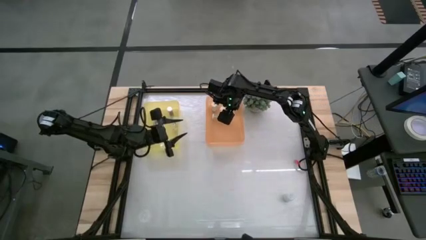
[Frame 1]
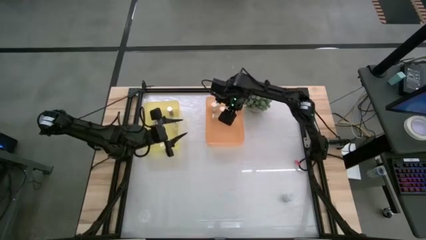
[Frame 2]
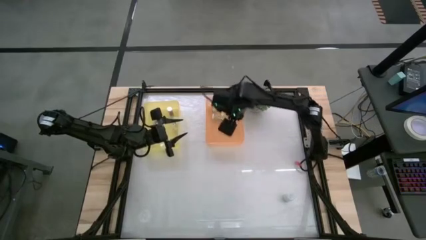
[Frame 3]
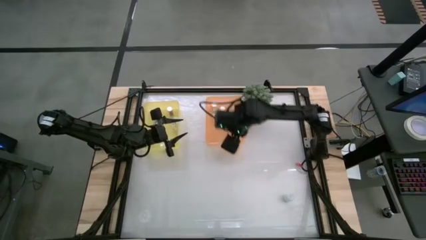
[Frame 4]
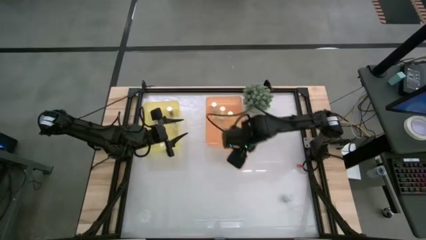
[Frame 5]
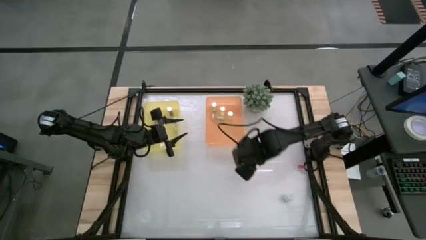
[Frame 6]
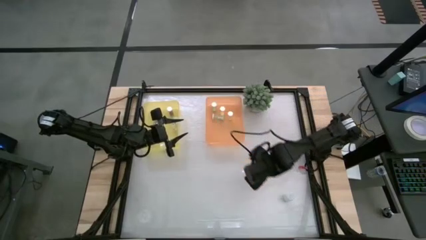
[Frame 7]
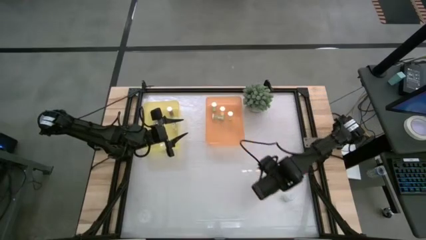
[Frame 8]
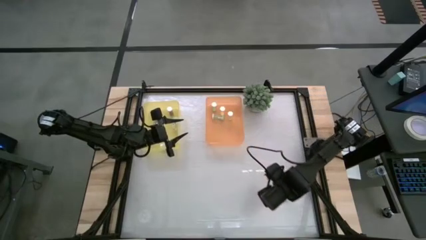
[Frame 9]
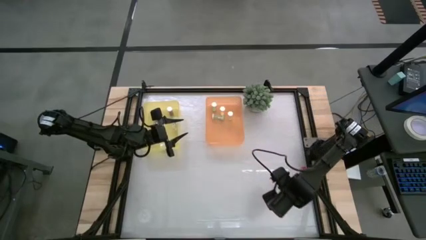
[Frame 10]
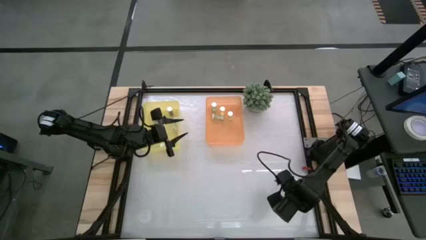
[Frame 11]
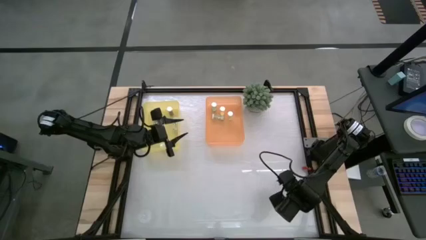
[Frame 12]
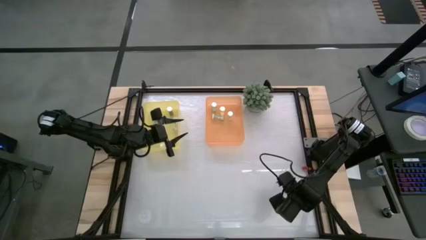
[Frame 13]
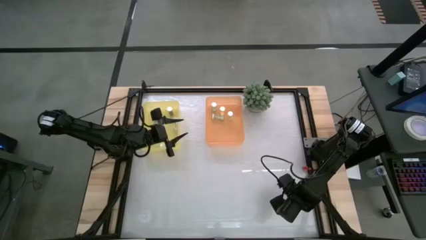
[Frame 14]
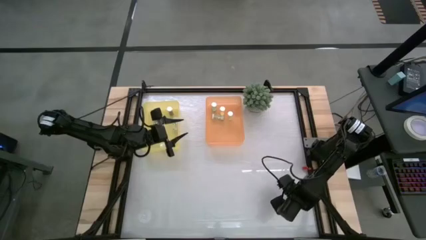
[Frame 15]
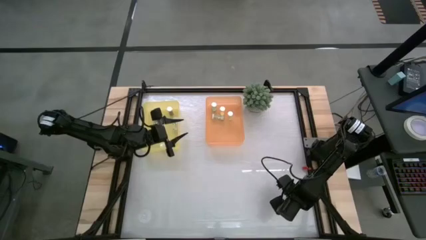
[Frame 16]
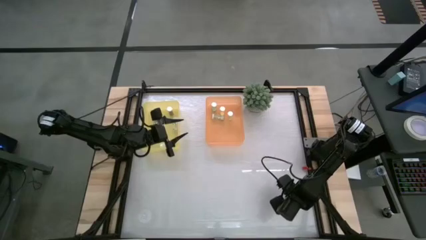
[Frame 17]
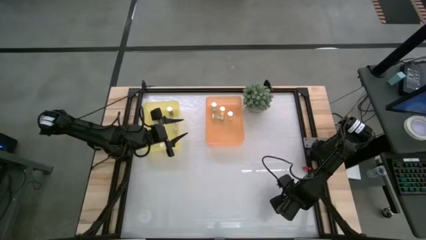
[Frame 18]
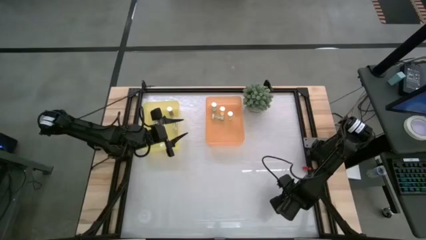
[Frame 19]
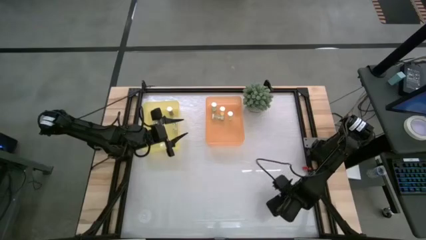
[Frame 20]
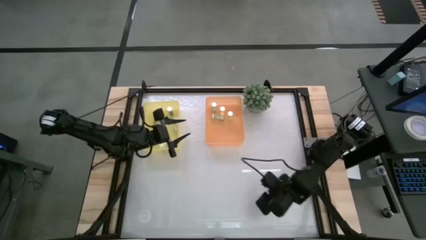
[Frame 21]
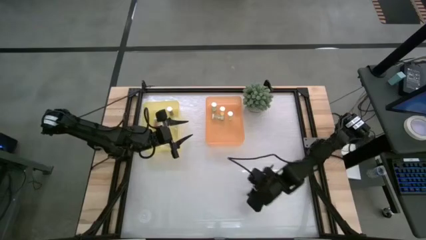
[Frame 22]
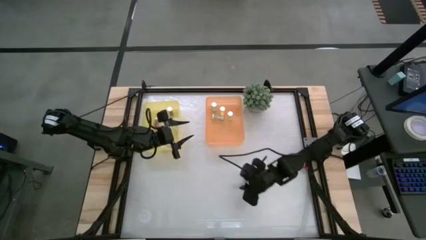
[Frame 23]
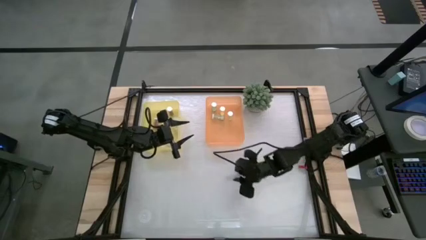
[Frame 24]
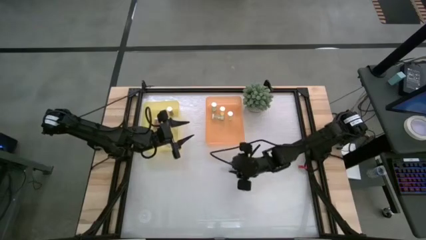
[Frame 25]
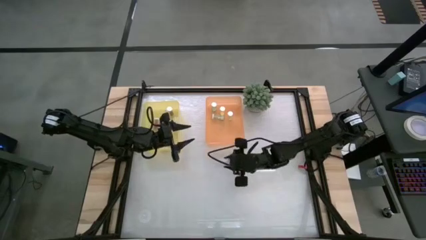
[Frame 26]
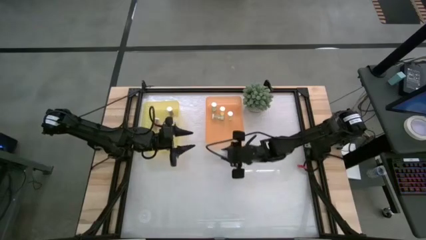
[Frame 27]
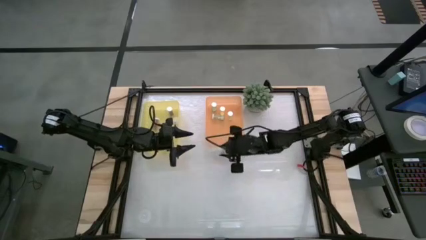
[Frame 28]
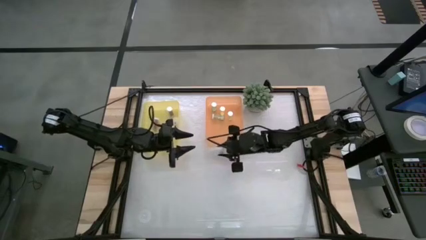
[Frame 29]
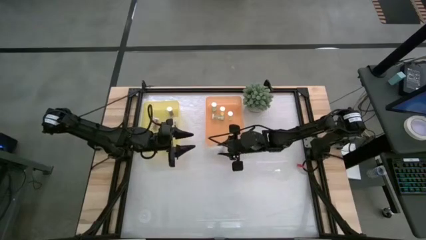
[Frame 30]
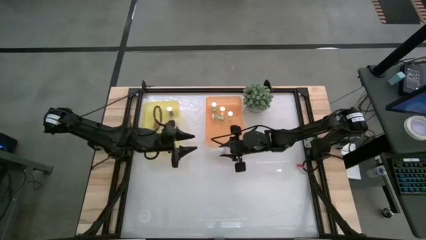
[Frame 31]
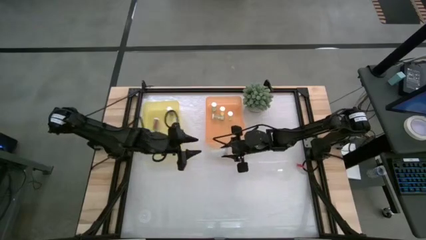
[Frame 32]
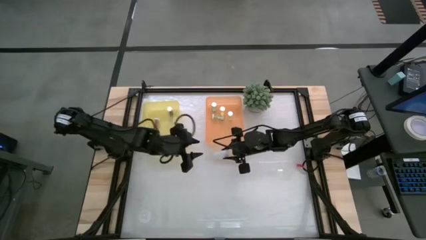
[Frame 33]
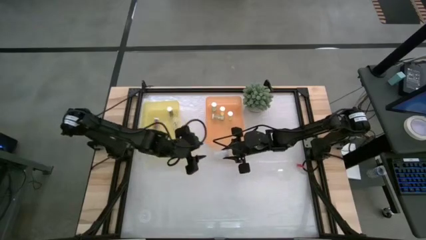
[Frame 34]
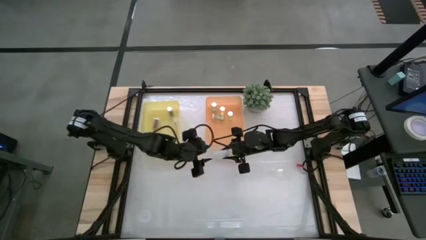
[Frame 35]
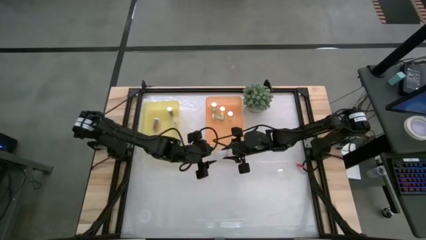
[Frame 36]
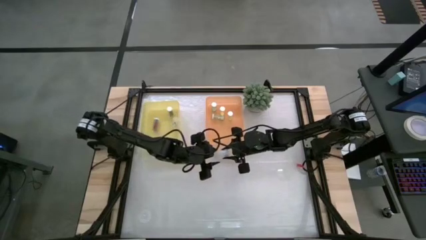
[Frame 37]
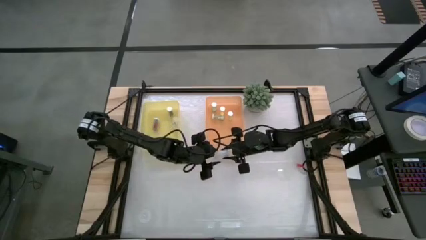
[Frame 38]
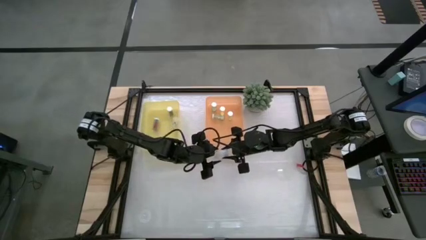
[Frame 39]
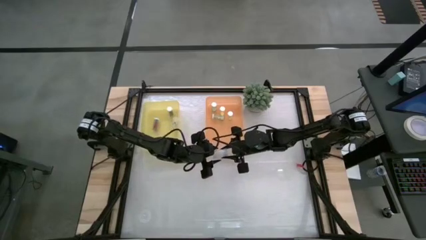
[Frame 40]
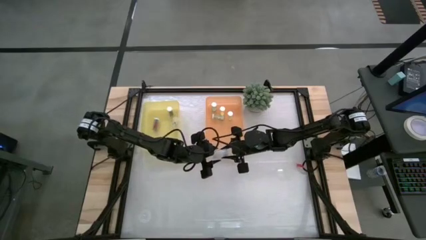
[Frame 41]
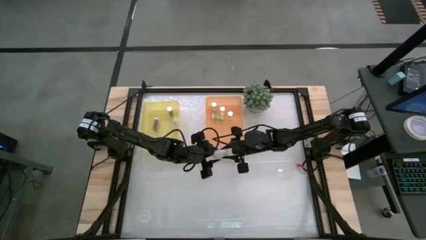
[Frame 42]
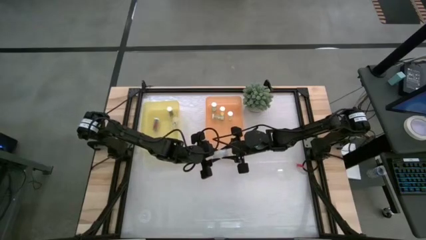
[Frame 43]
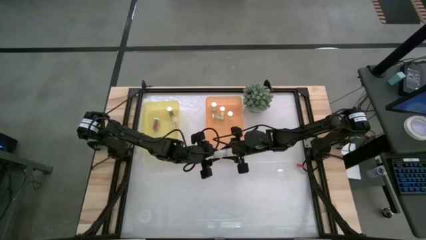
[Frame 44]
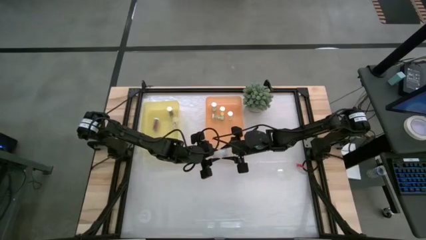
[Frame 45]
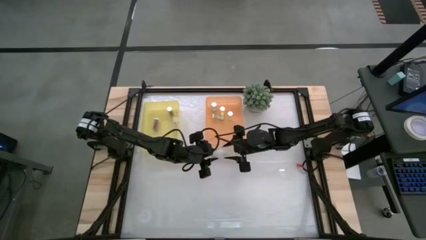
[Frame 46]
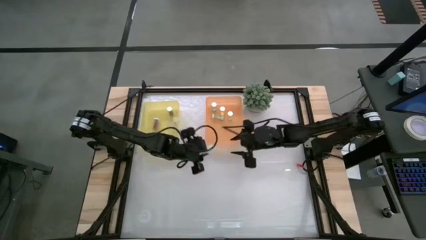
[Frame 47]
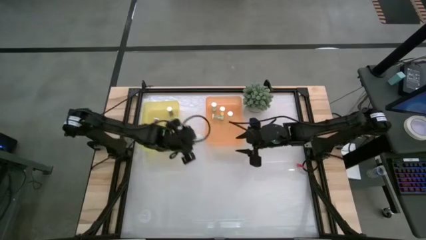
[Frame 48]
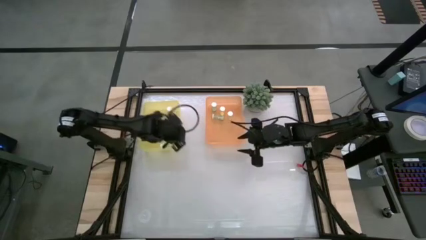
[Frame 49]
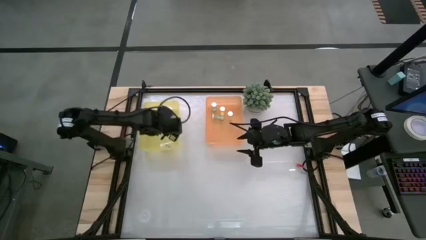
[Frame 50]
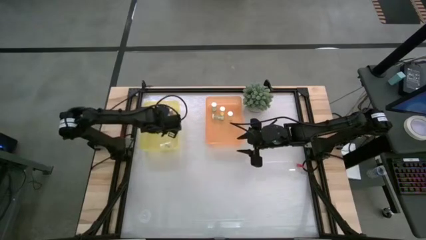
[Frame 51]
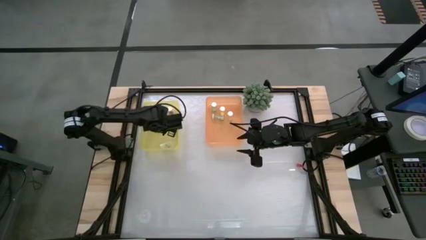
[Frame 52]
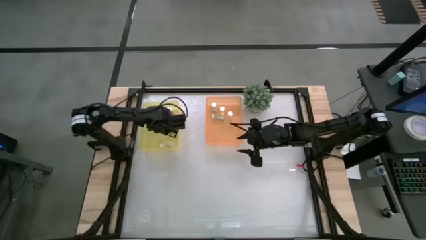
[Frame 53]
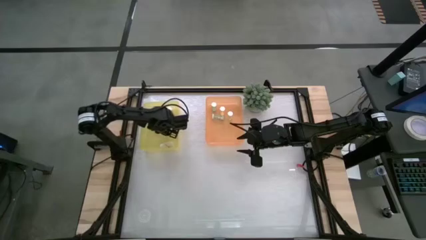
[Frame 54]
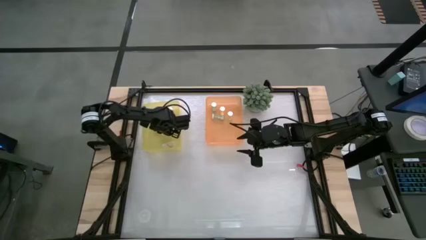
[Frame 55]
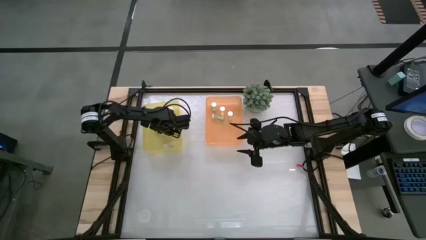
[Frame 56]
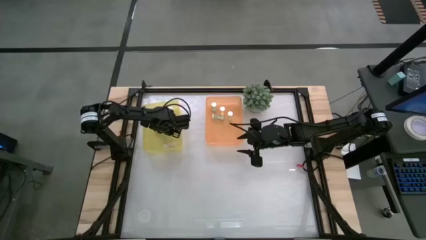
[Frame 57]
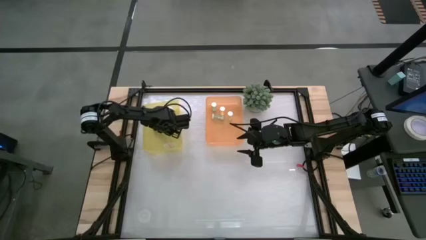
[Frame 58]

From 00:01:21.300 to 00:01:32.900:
Task: Pick and place medicine bottles into bin by pill shape (circle, oval)
Put the white capsule bottle into the yellow bin

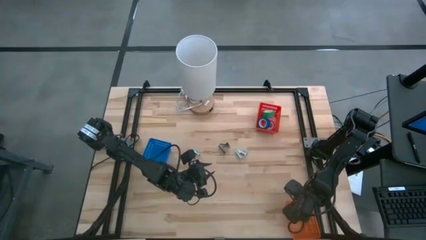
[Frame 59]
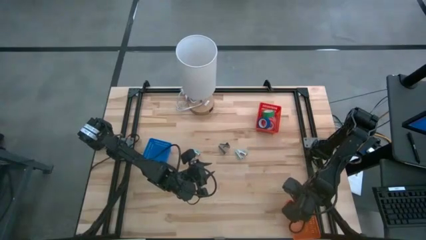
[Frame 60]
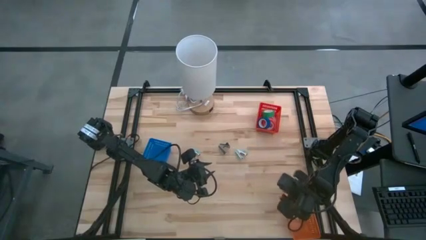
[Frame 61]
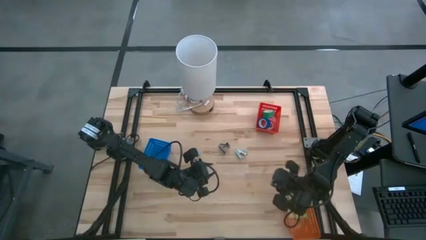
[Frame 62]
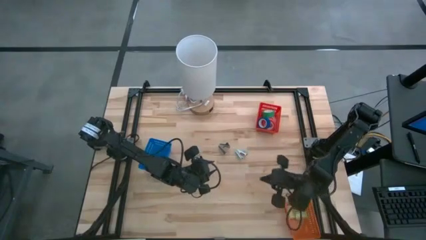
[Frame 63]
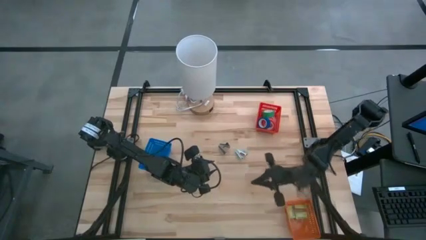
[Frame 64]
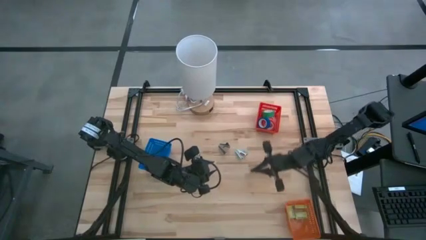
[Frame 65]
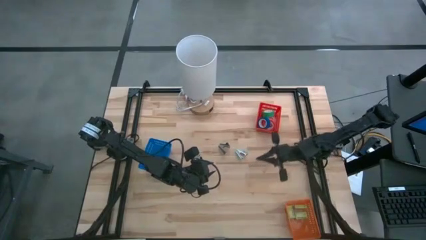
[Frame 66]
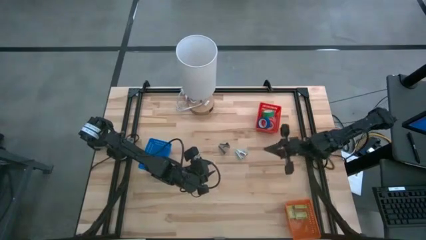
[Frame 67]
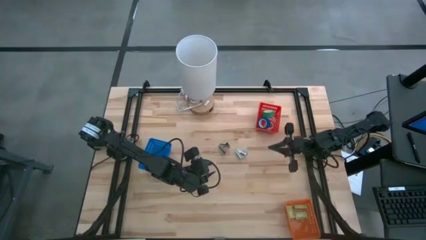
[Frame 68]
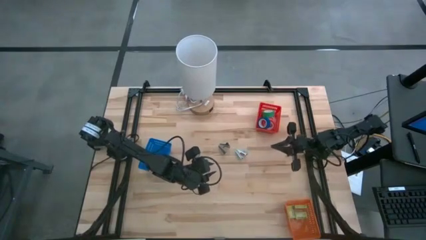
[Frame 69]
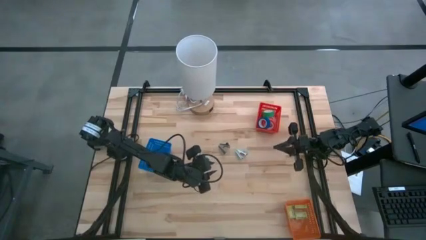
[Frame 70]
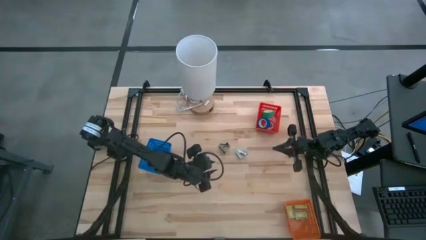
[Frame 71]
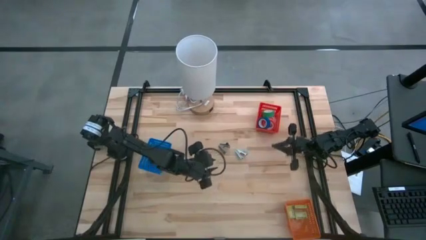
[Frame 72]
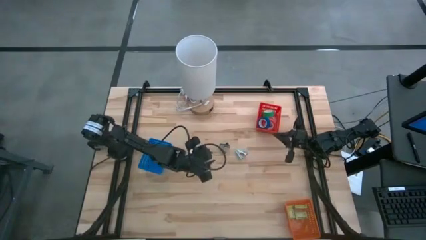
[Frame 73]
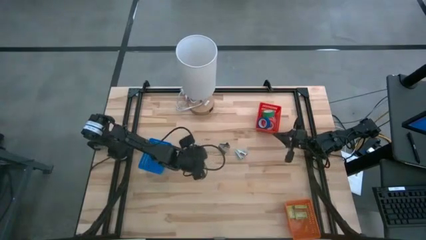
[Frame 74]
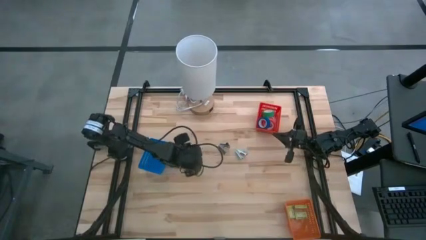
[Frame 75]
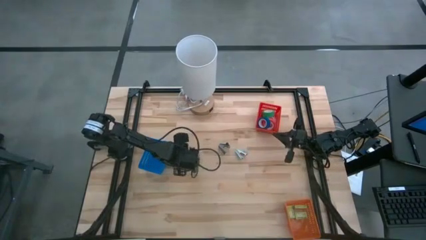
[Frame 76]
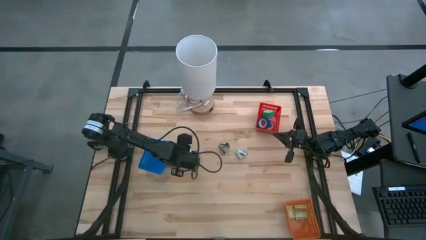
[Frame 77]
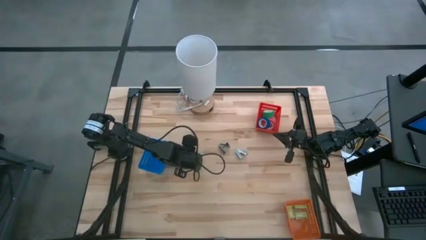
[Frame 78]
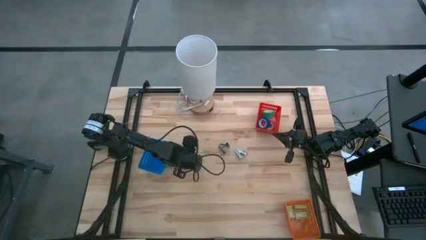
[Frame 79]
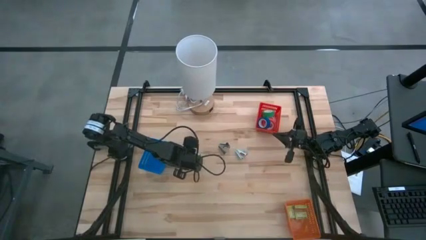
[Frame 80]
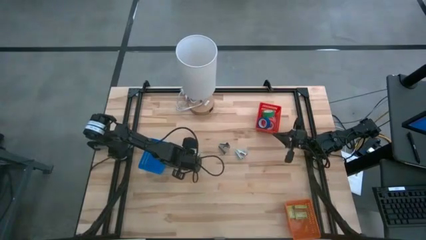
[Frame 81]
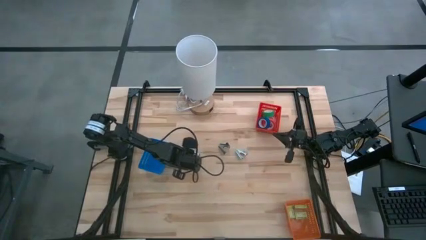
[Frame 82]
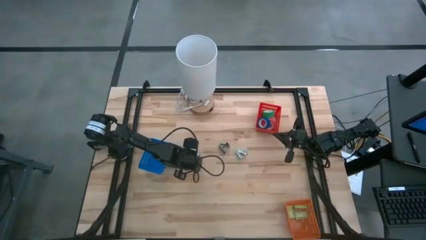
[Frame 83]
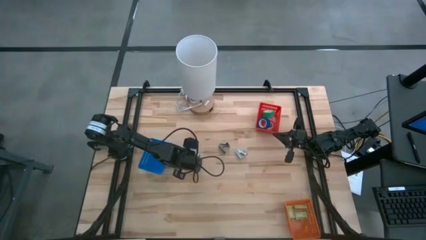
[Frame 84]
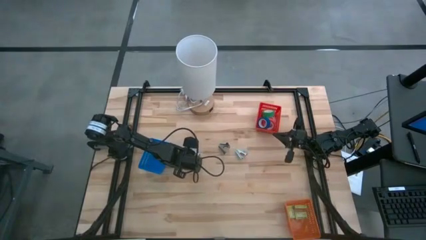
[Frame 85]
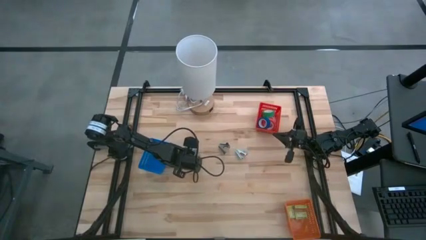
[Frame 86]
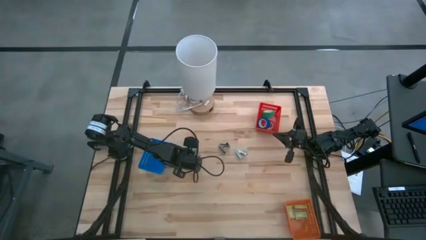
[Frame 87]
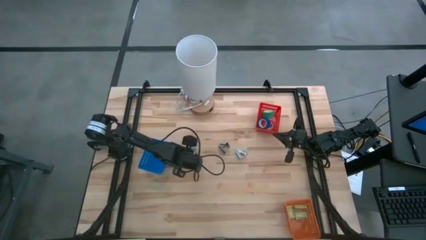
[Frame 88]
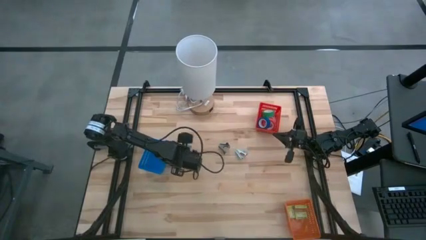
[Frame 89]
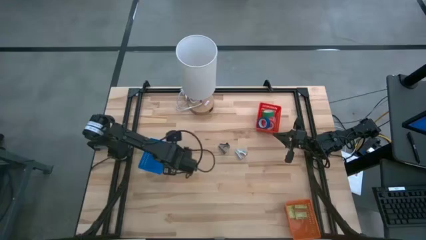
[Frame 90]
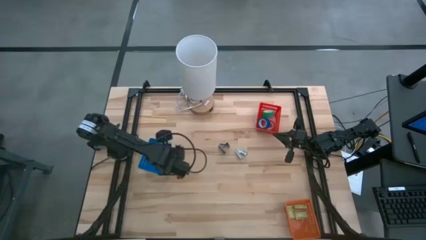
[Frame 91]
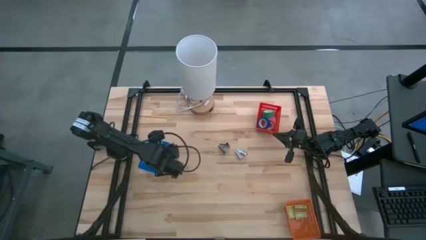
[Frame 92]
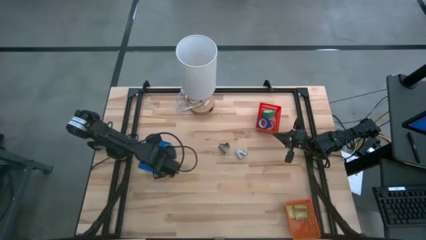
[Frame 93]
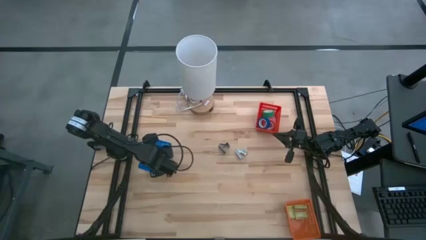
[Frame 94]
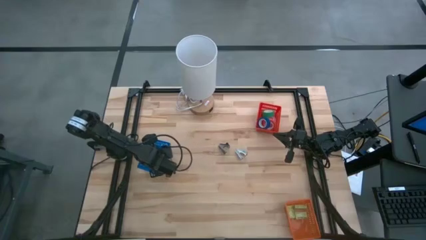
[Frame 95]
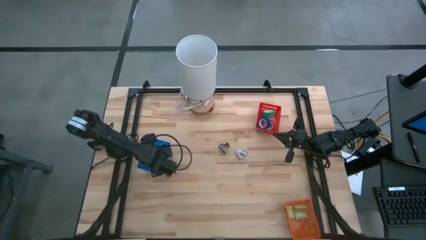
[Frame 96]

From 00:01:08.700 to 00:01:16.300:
Task: Pick and place Stapler, Stapler remover, tape
Put the left light blue staple remover into the blue bin
